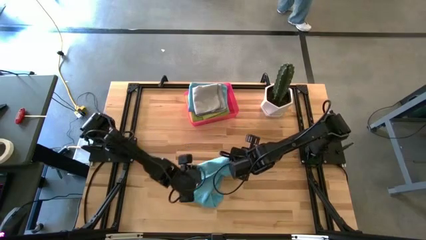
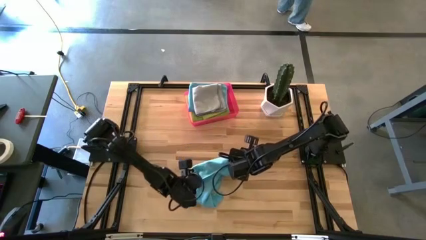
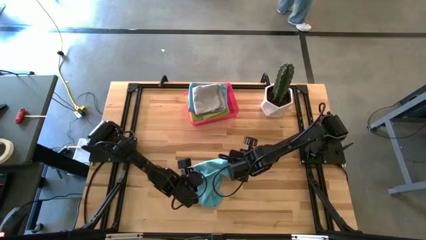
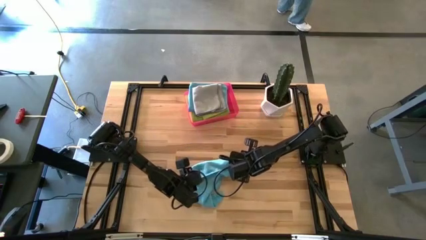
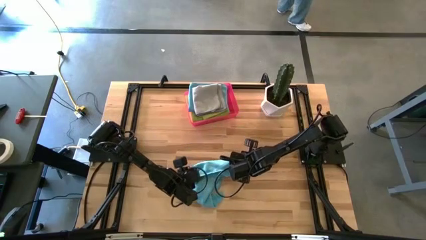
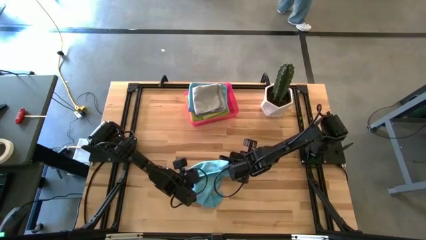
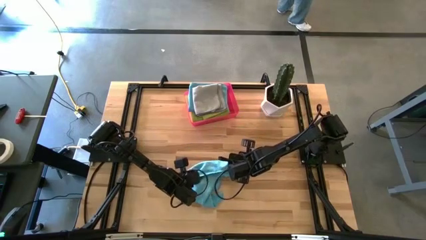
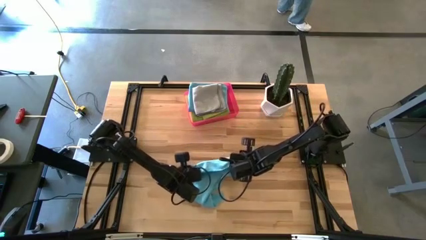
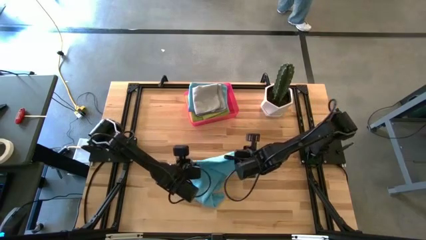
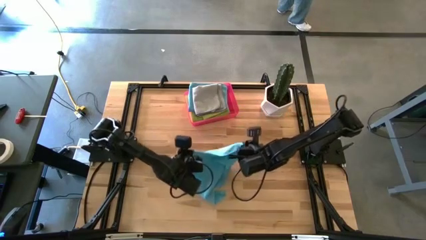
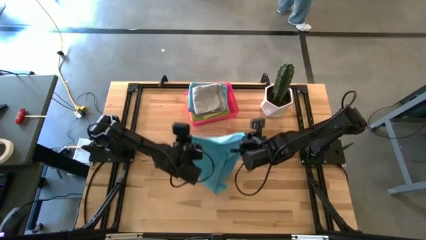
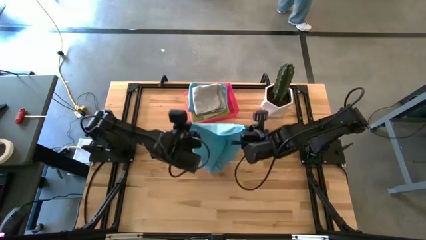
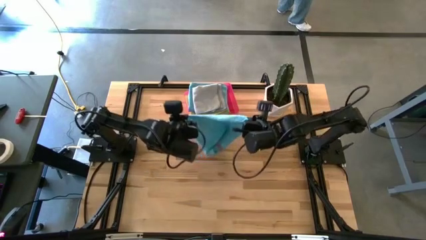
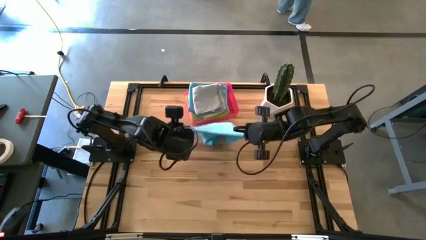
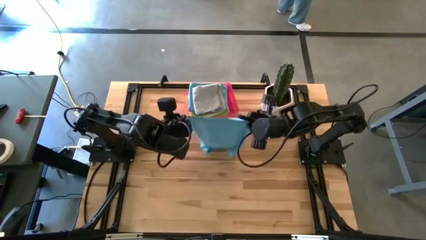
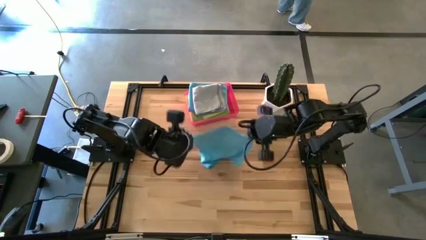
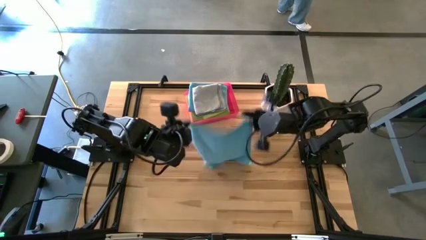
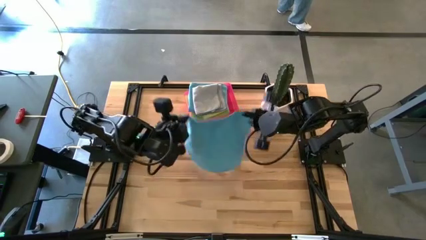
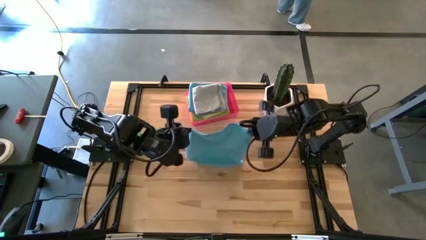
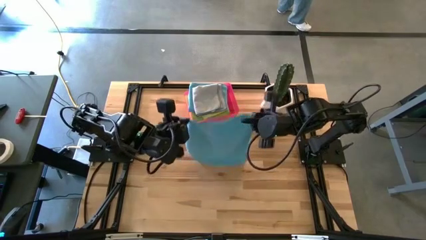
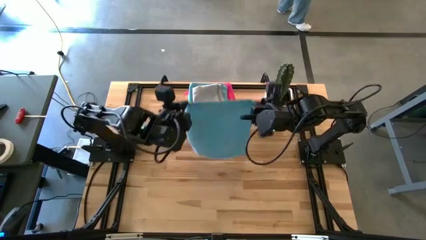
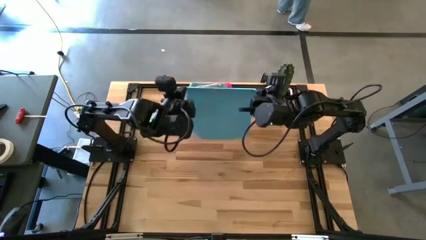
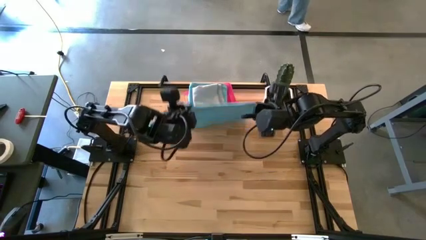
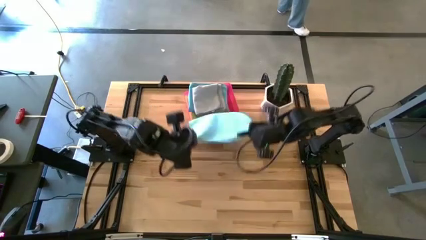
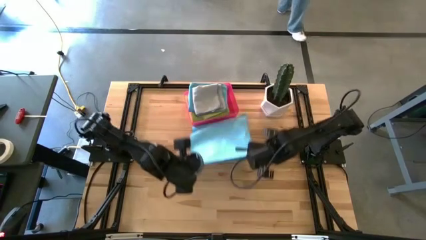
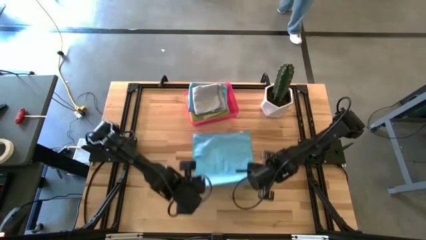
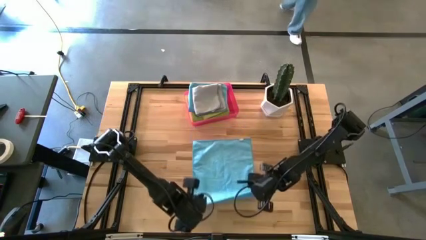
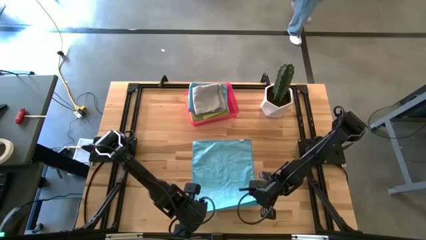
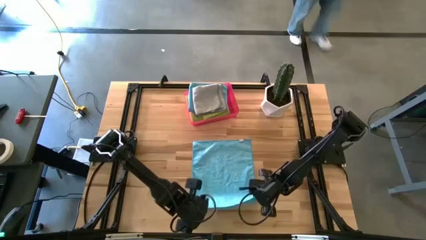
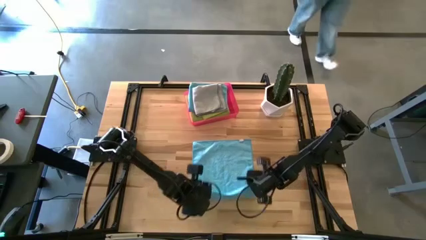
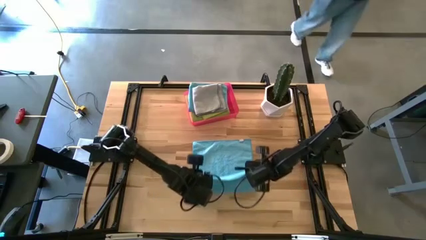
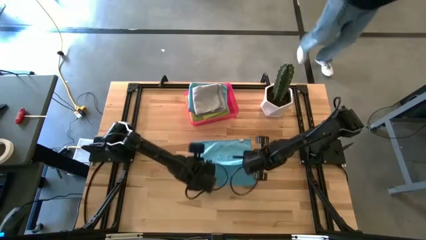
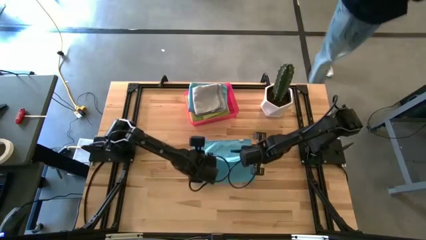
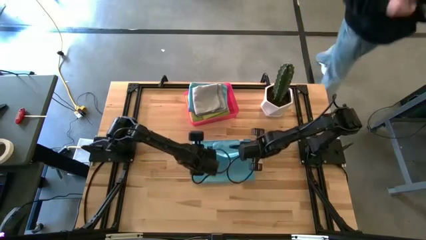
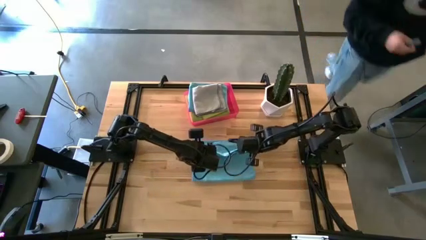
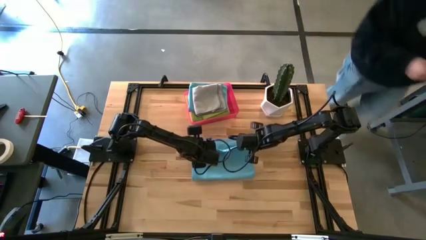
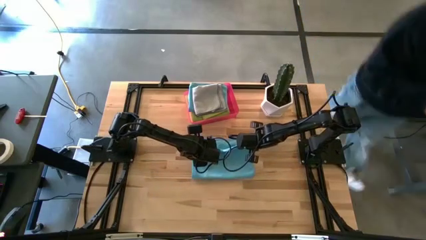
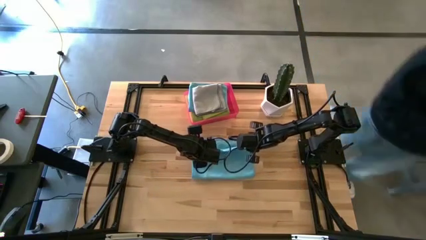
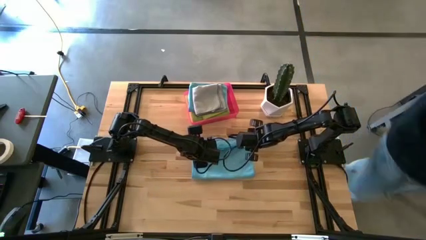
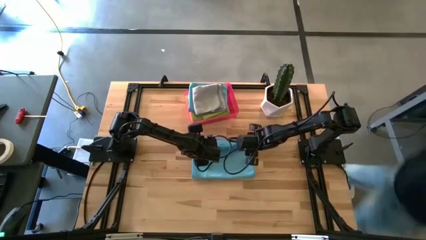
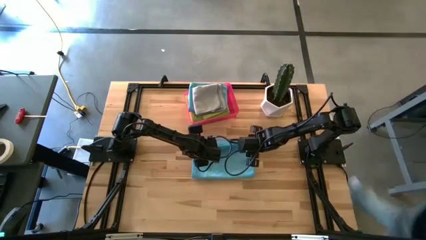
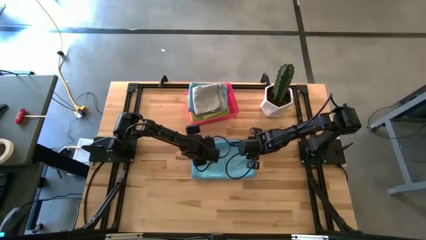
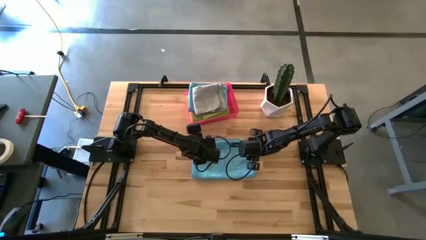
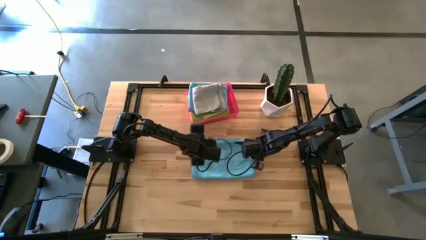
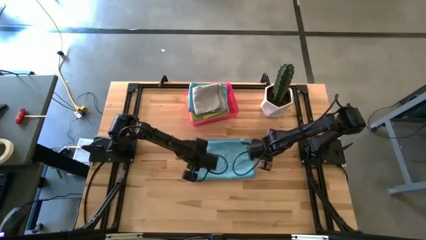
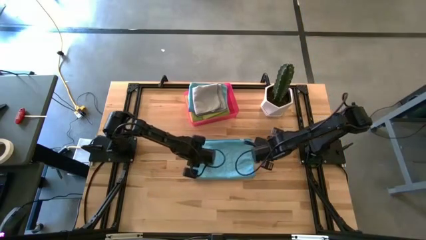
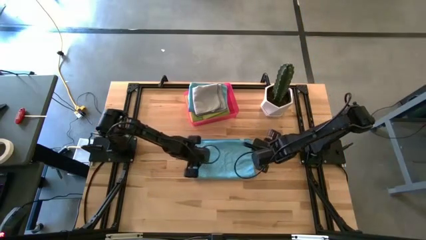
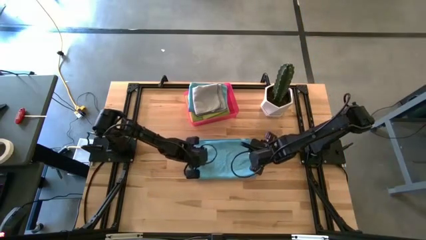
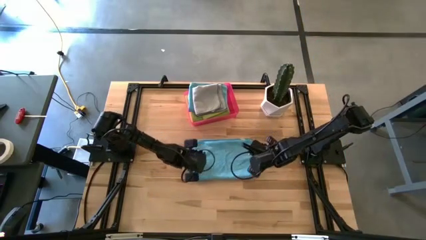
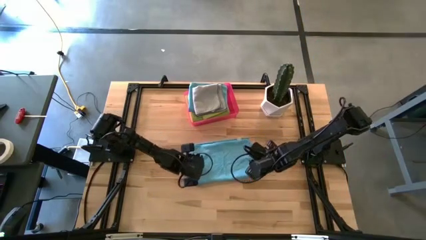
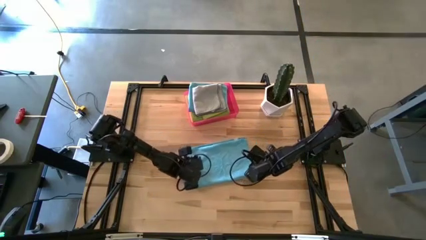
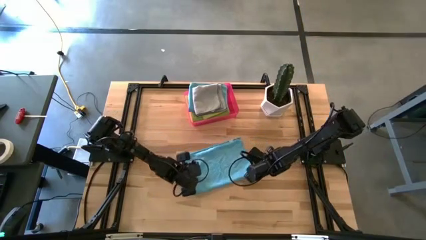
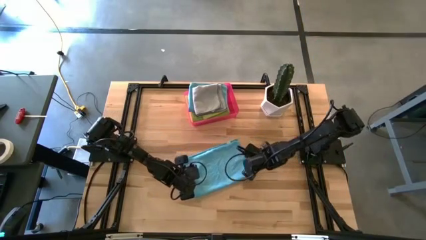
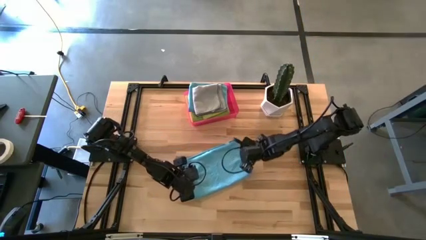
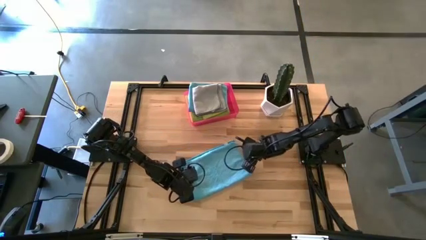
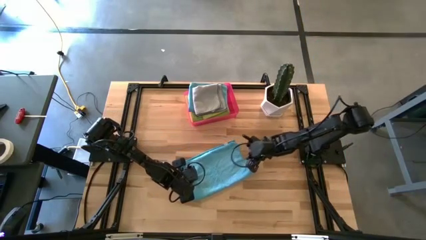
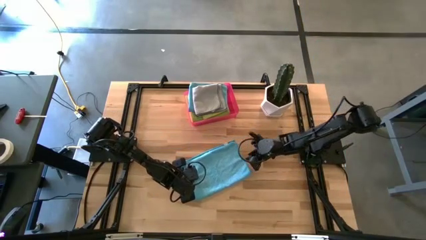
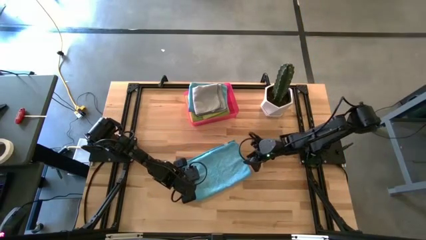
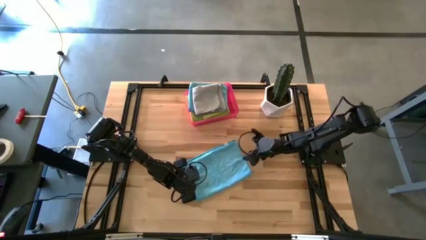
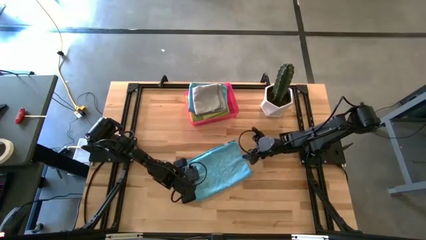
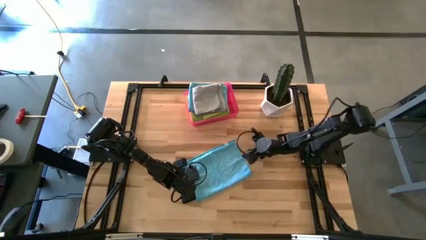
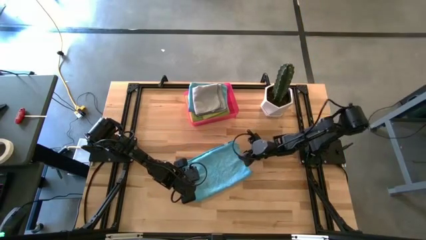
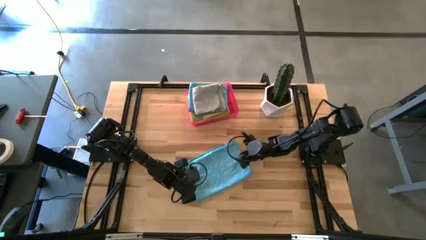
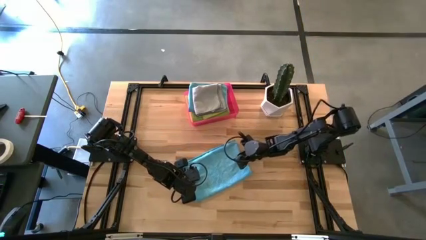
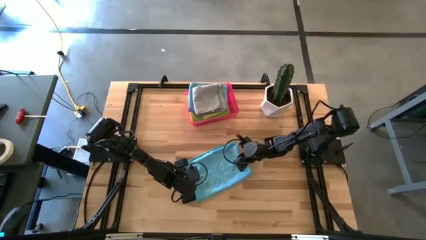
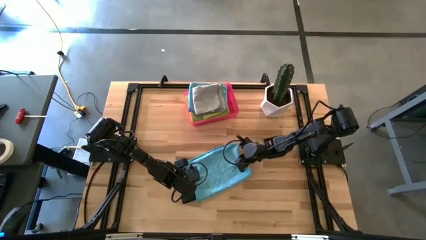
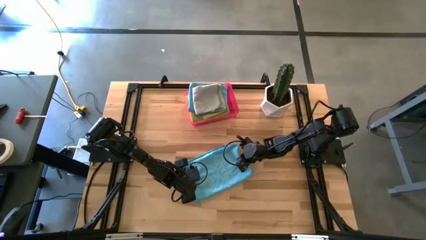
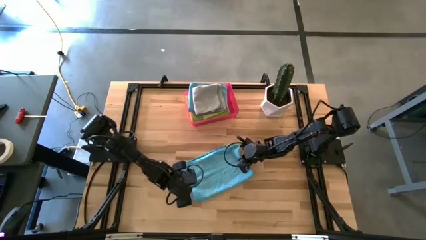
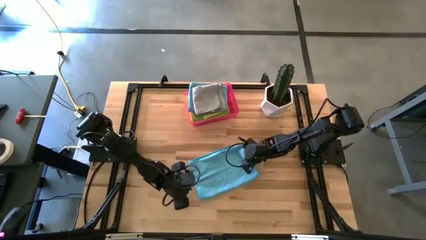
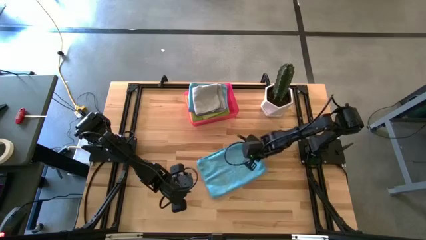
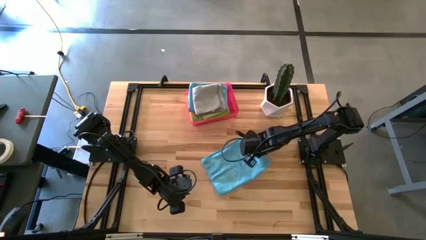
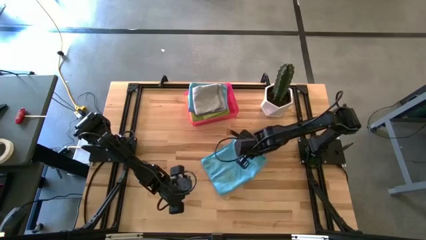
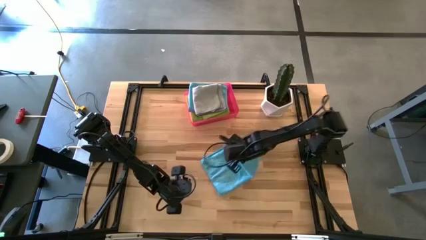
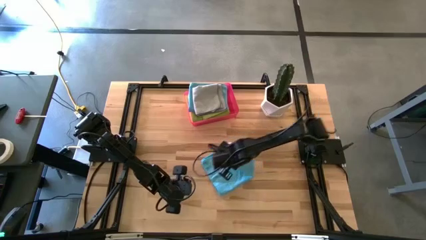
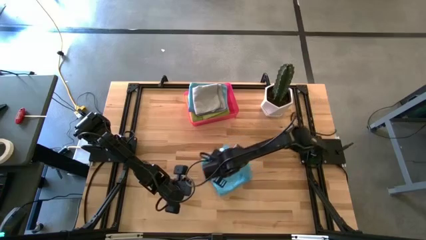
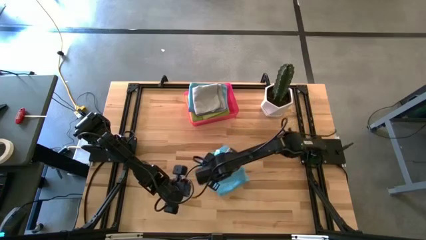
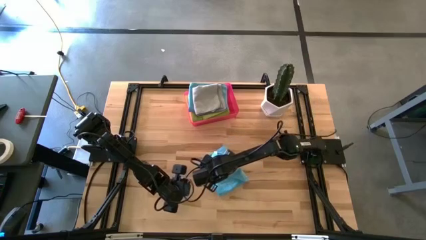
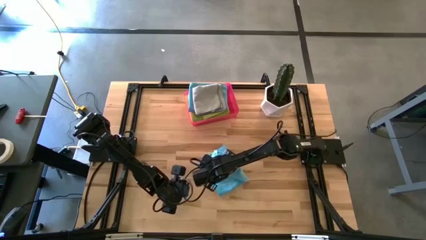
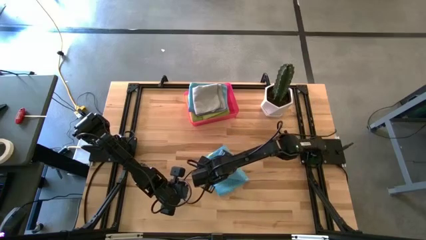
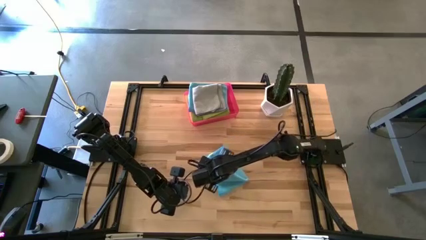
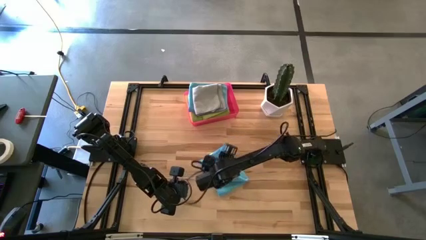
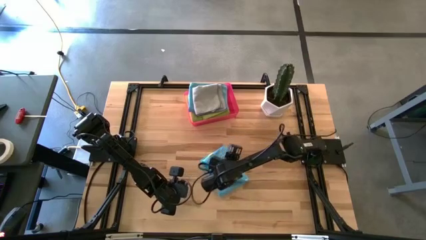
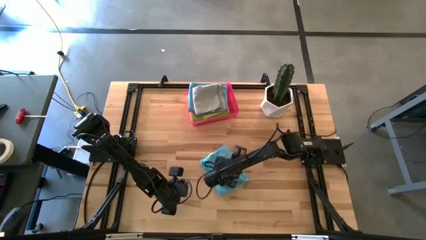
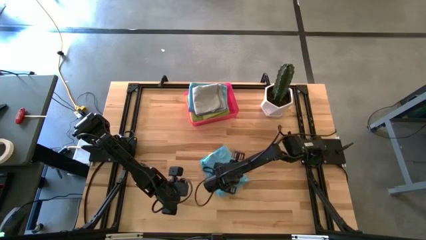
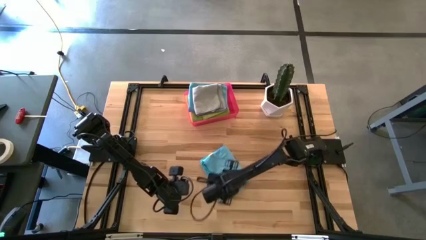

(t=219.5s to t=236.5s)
Task: Fold microfiber towels
Fold the blue microfiber cloth
